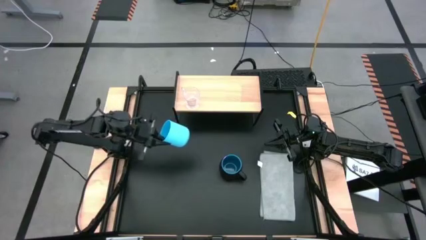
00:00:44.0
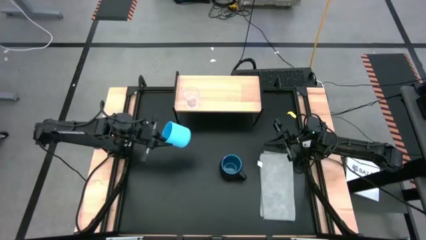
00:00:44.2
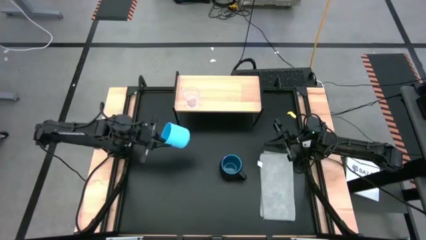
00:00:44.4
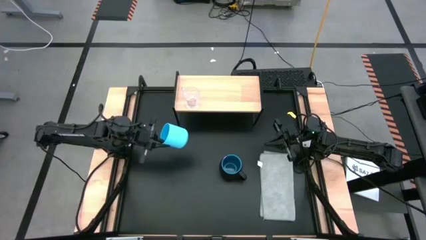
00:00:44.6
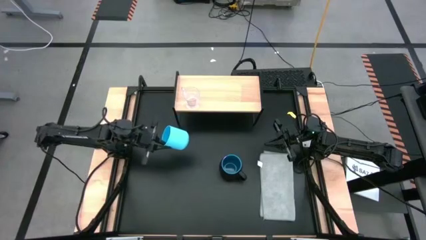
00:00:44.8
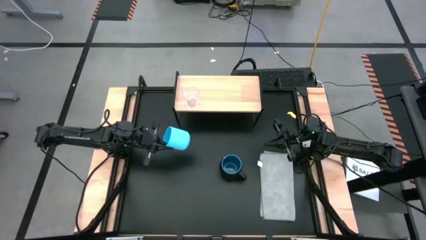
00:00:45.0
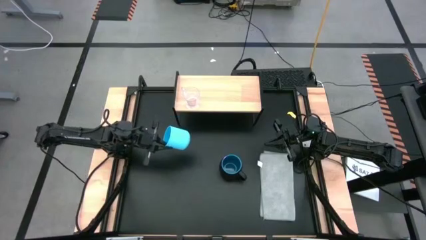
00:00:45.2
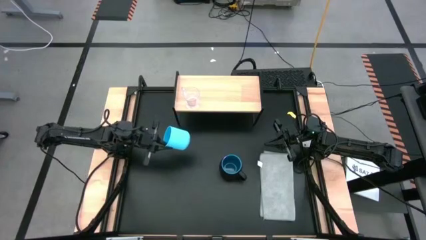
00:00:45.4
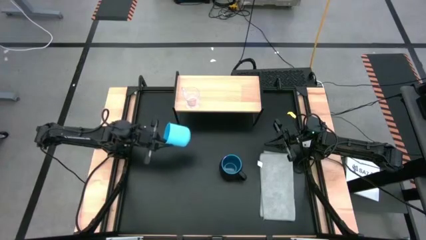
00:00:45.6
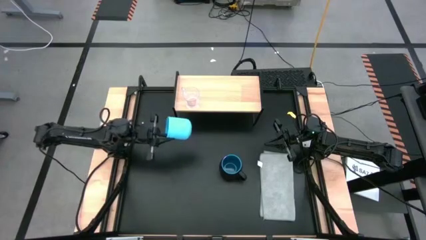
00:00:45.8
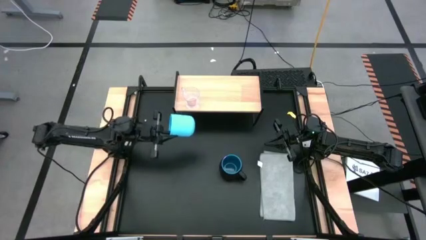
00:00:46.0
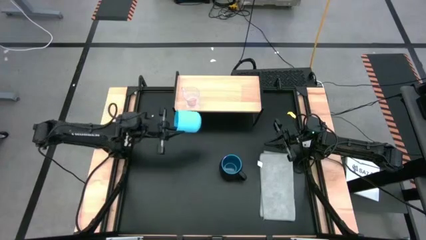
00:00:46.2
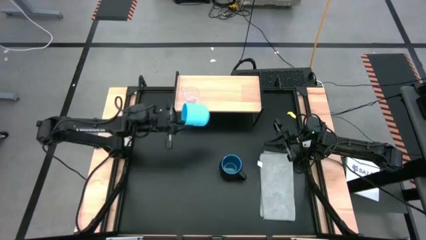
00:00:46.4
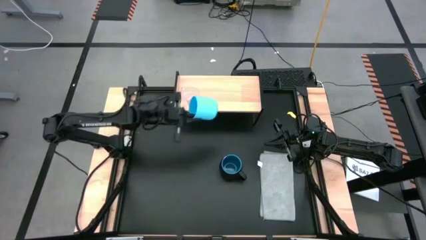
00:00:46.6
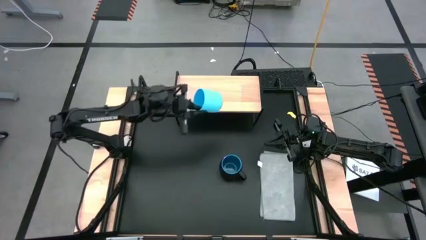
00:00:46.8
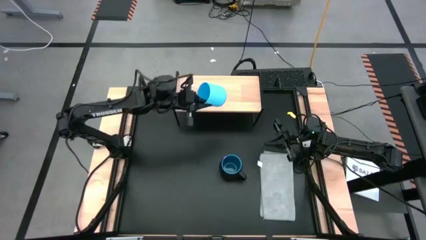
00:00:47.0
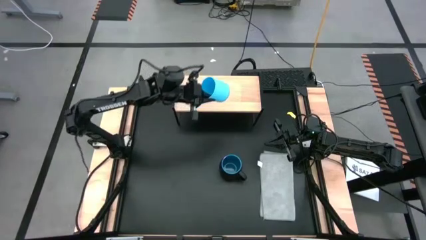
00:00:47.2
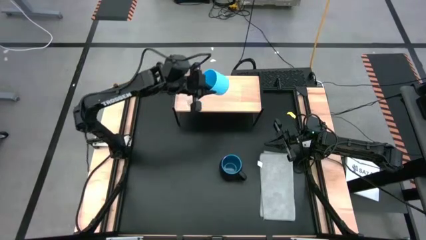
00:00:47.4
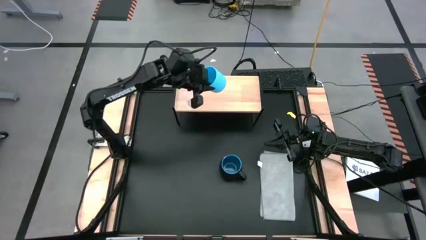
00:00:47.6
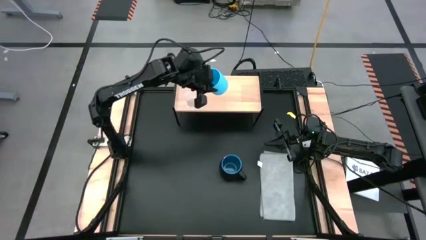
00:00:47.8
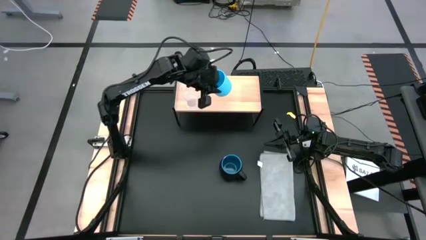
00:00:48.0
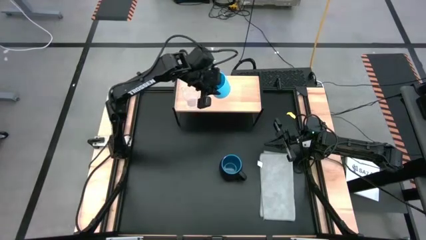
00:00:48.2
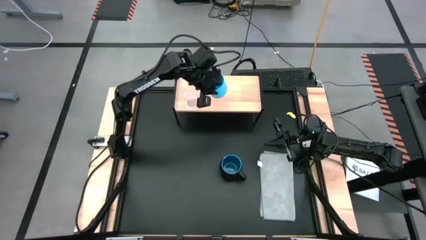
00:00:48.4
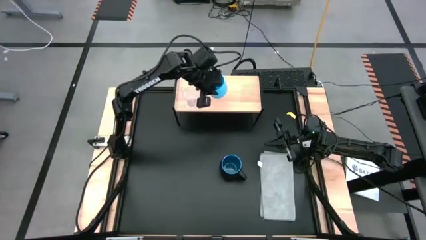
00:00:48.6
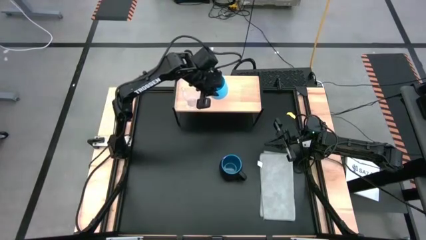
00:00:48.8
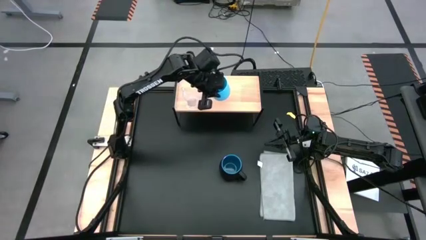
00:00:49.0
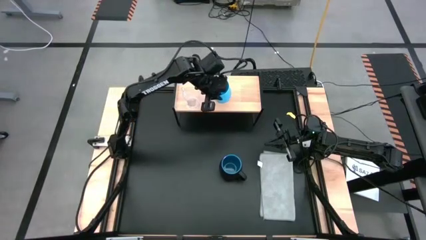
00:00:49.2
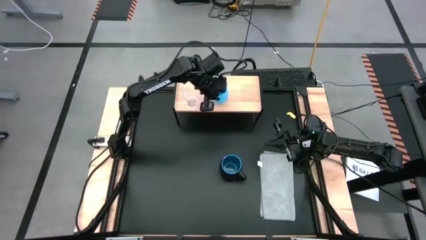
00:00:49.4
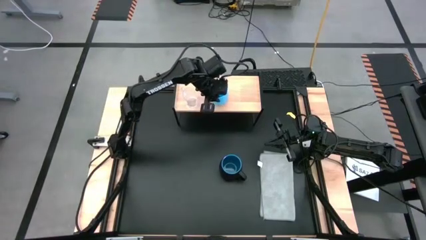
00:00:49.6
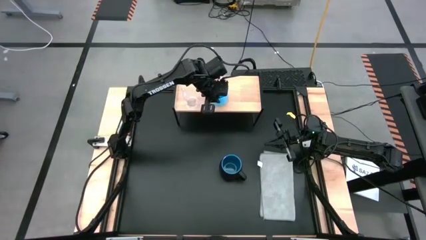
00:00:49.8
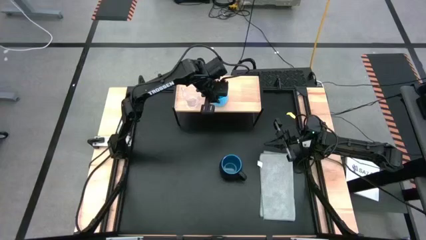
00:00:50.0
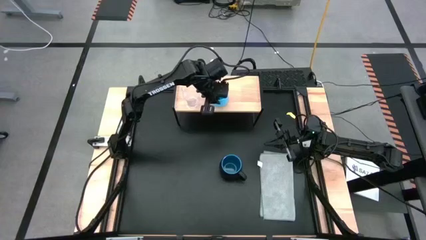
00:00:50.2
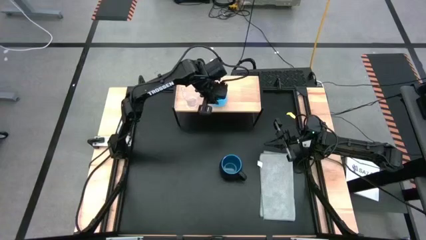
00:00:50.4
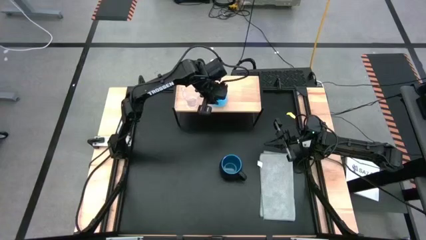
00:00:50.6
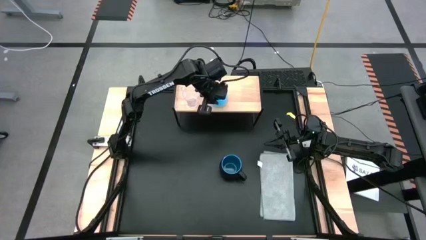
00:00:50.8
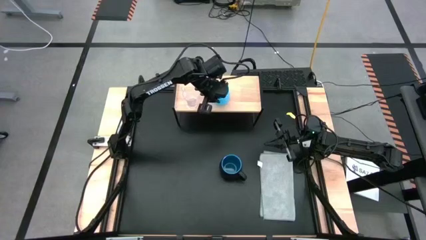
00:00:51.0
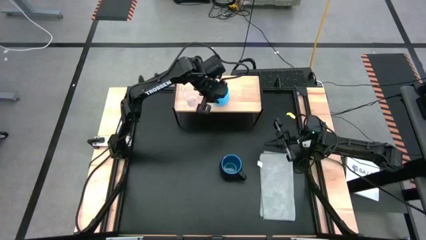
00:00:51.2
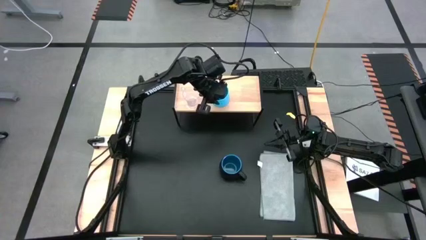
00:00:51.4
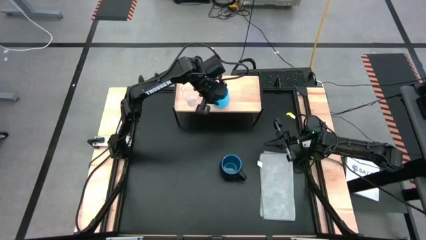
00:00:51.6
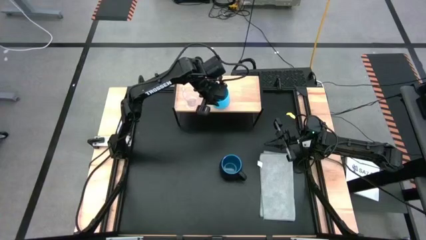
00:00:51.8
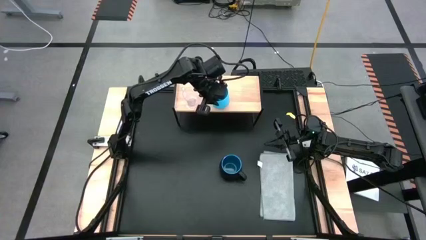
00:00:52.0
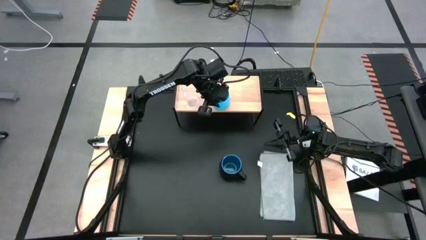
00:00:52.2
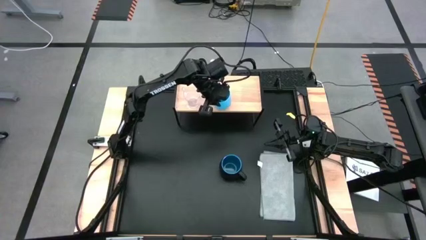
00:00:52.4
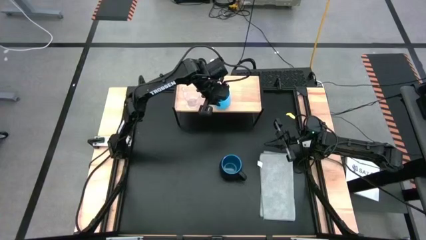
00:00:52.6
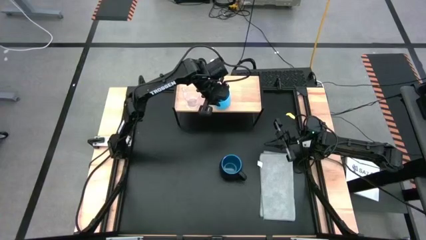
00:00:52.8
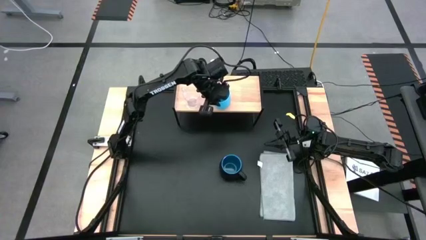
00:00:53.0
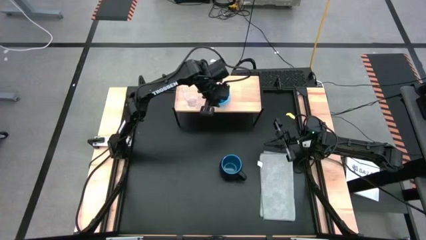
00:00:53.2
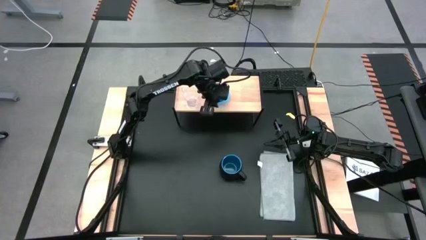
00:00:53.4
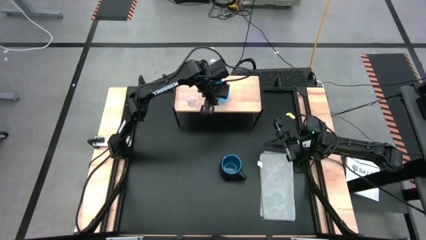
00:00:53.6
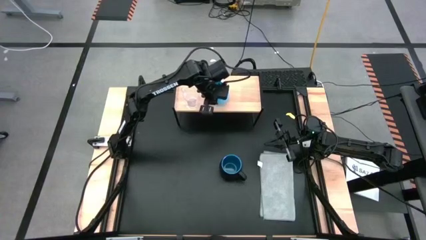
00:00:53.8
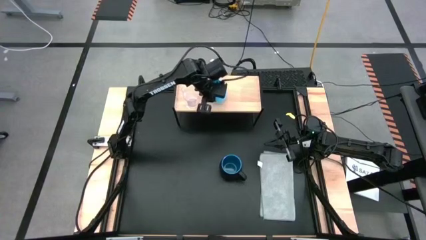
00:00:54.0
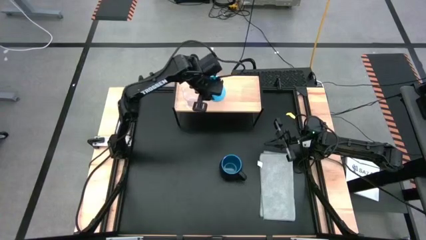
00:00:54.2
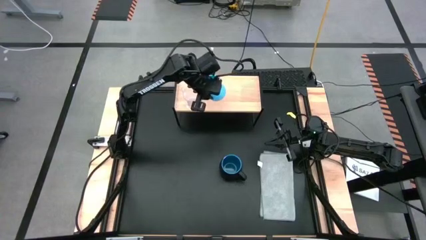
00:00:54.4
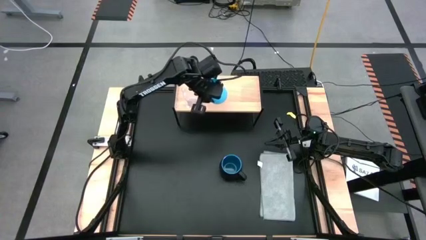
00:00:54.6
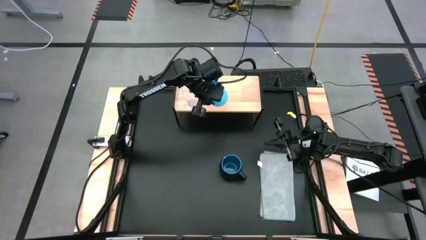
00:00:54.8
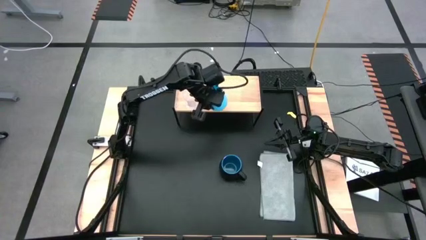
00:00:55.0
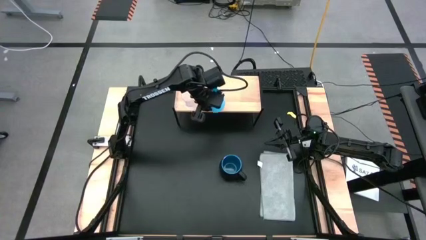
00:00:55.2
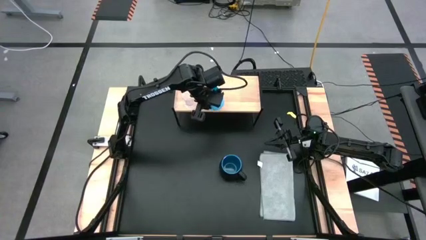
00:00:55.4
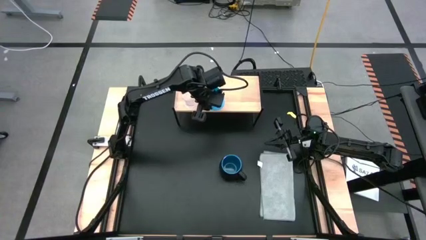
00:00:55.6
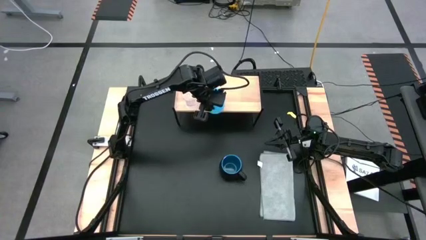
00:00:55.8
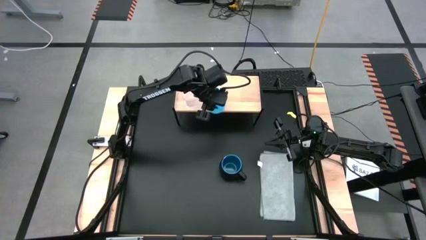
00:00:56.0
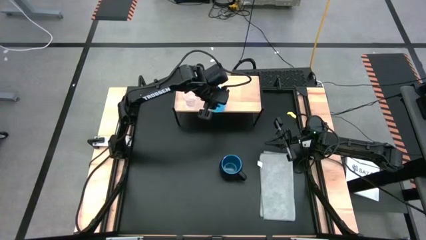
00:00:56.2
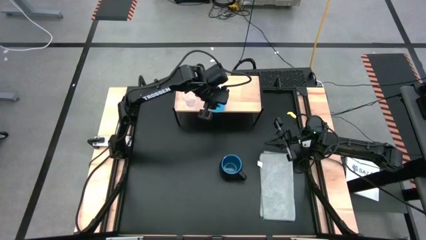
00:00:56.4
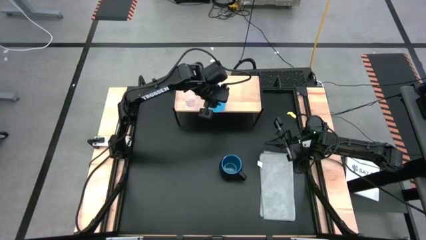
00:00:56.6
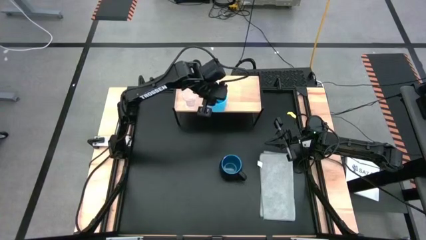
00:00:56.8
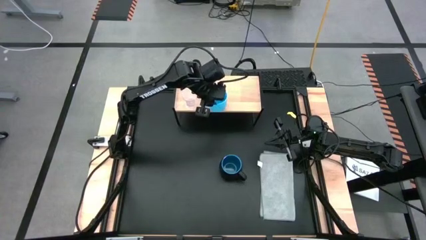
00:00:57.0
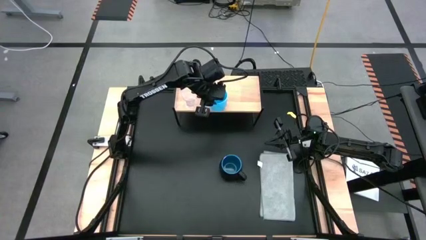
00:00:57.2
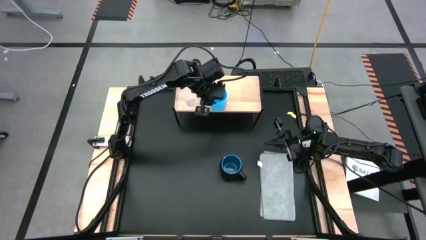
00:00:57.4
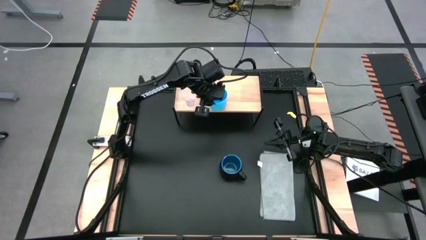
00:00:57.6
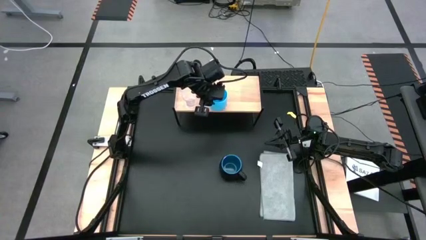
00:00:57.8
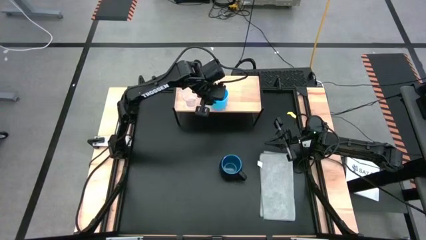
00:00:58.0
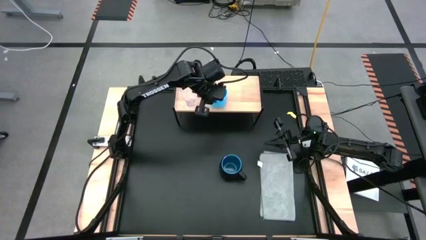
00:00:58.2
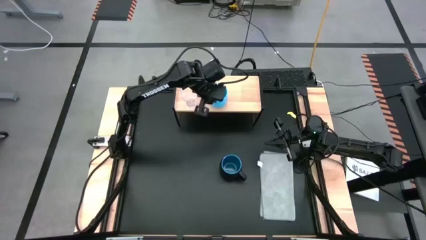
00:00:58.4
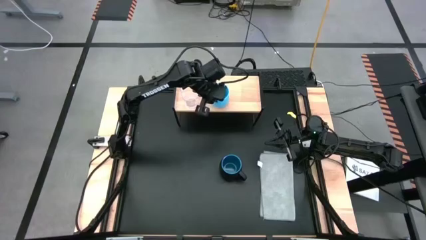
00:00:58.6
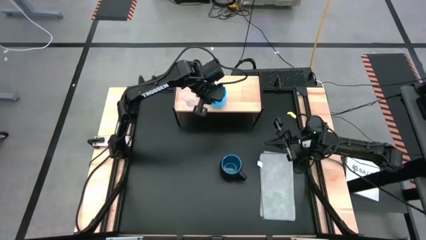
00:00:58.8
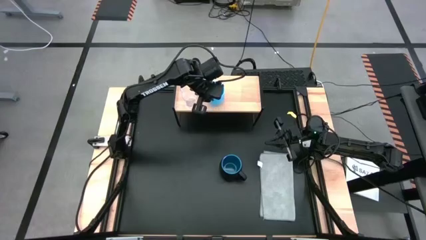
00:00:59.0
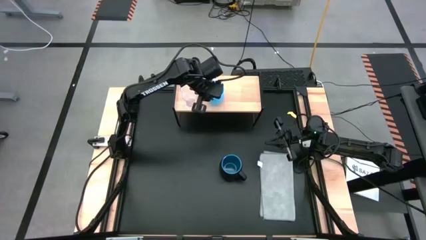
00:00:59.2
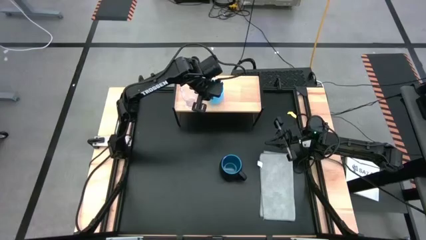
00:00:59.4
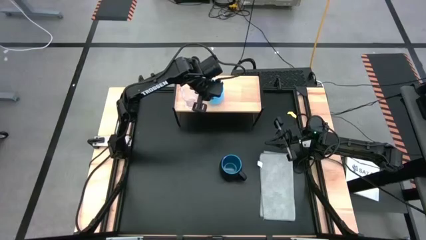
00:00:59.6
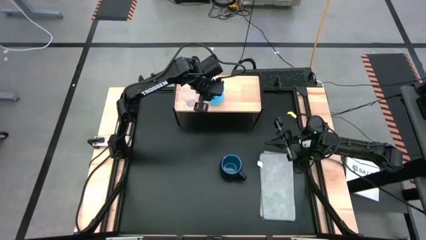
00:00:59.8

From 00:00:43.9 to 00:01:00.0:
Task: Stack small to large cups/mugs on shelf
Put the light blue mug on the shelf

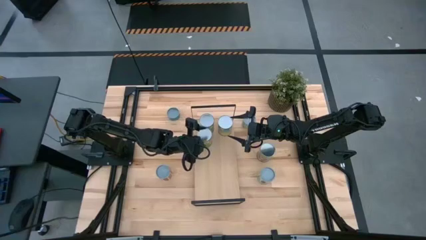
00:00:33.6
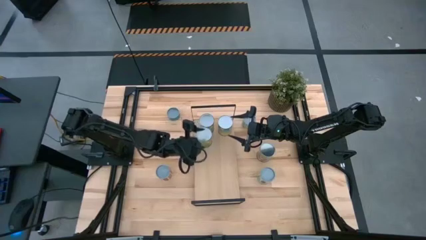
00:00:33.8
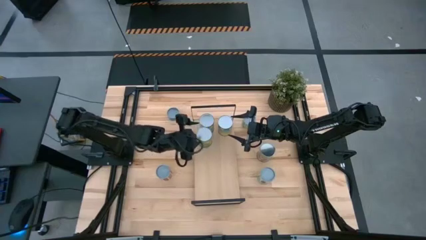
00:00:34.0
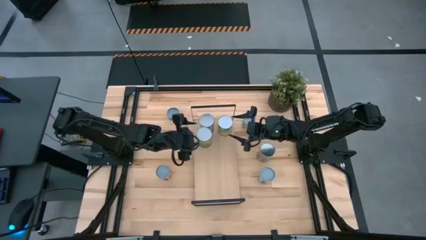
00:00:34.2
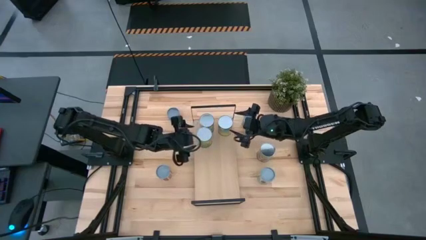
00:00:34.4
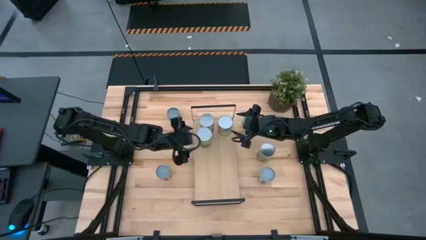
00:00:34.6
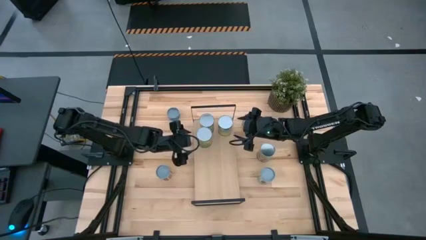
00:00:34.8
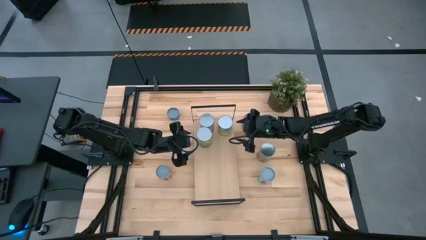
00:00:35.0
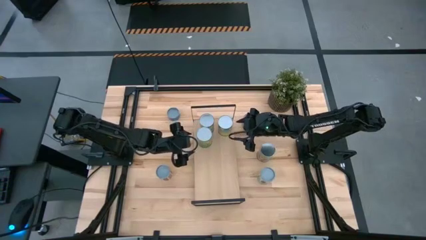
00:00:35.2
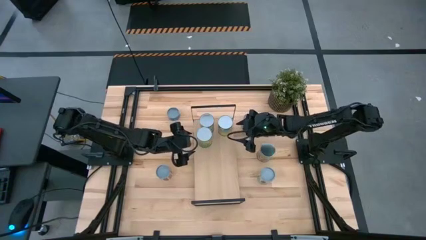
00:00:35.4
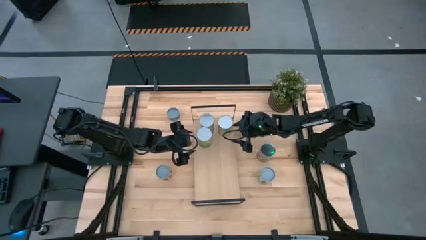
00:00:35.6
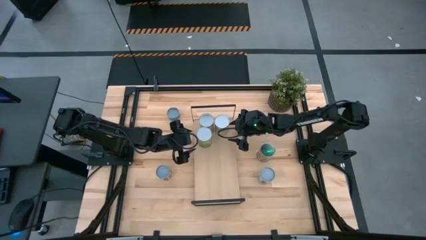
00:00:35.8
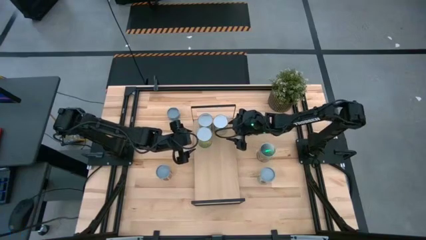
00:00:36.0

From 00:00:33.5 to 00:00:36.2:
Task: Pick and place cans onto a shelf
Adjust the canned peaches on the shelf
